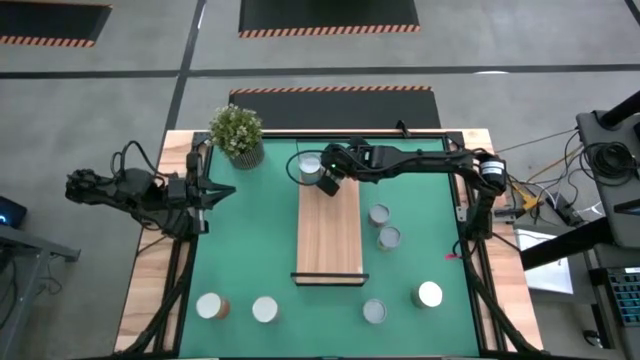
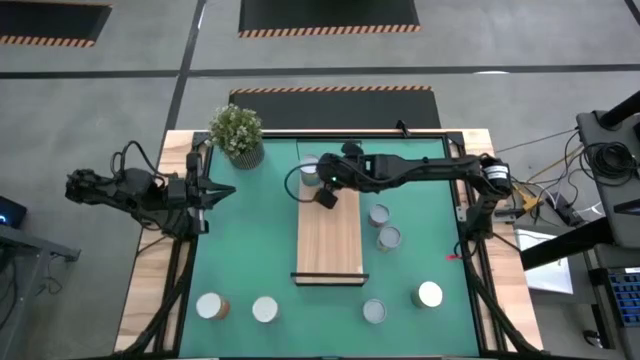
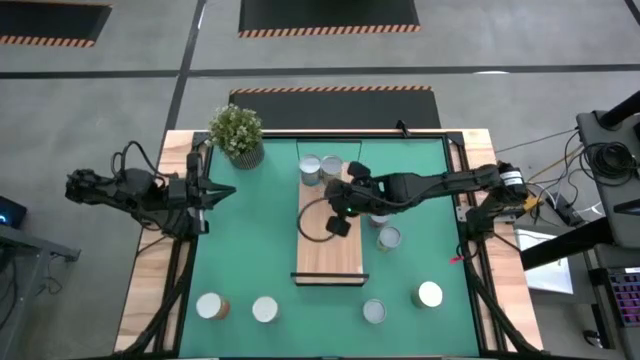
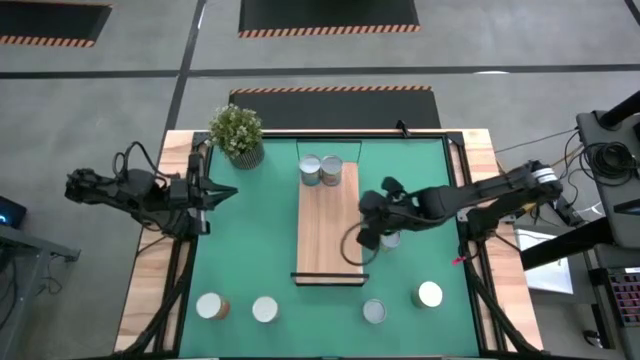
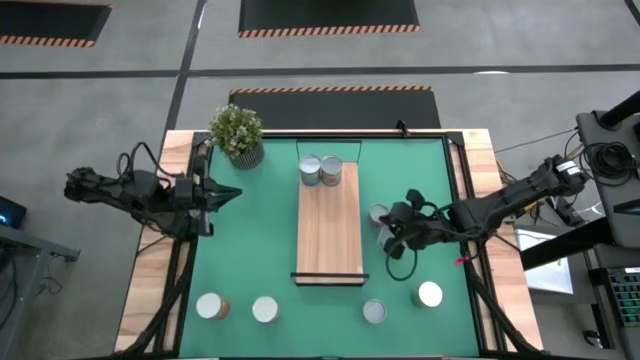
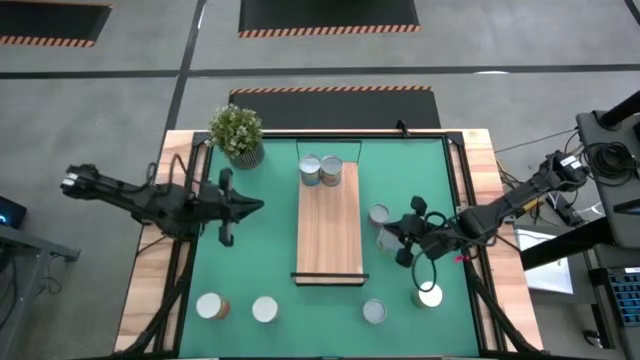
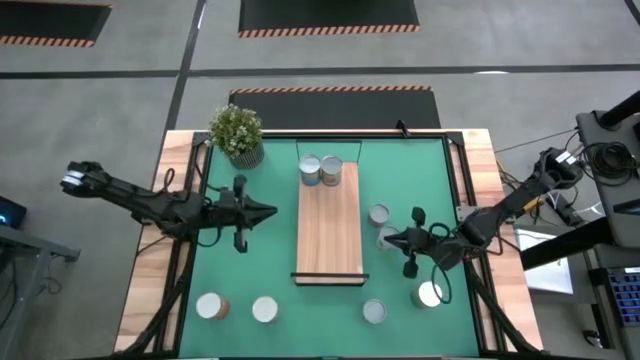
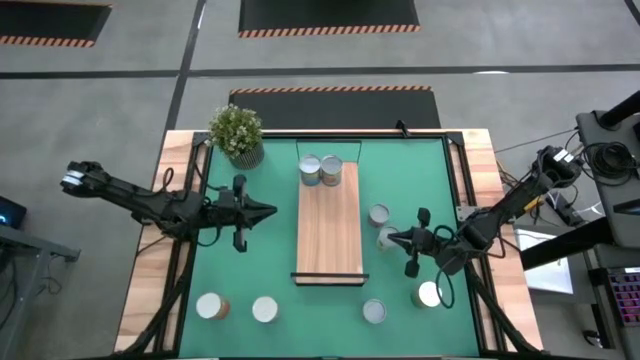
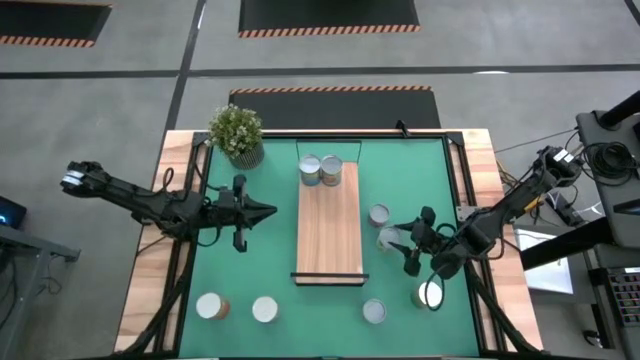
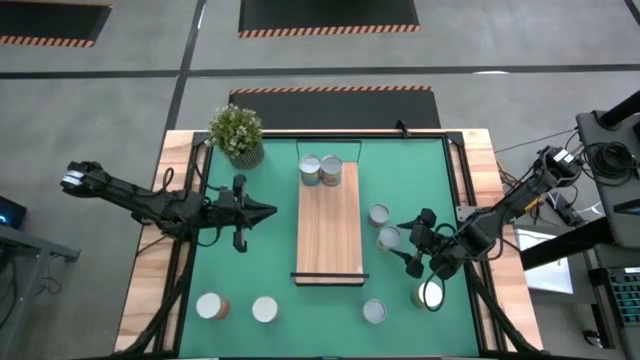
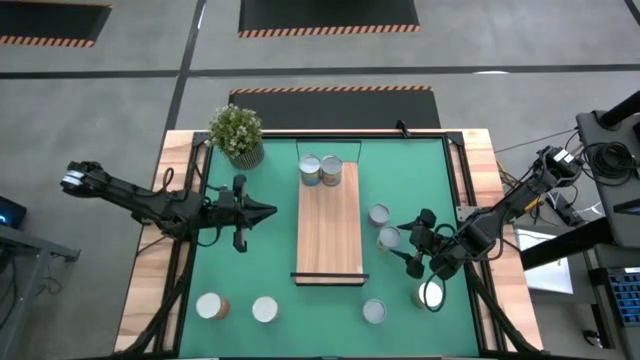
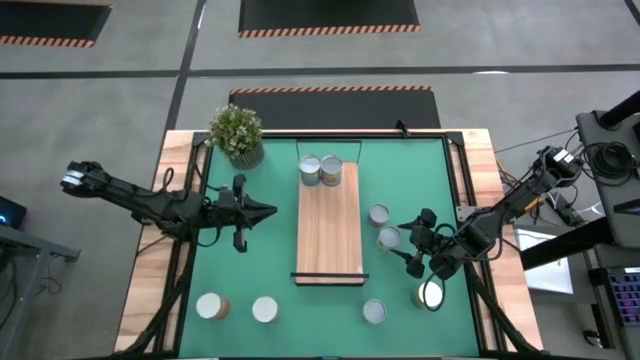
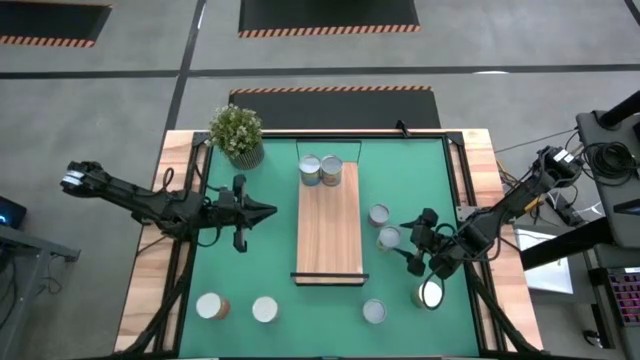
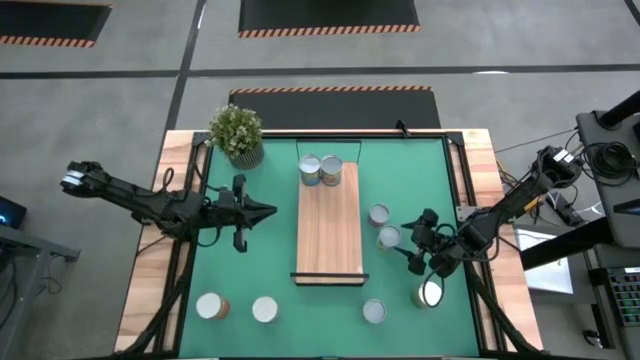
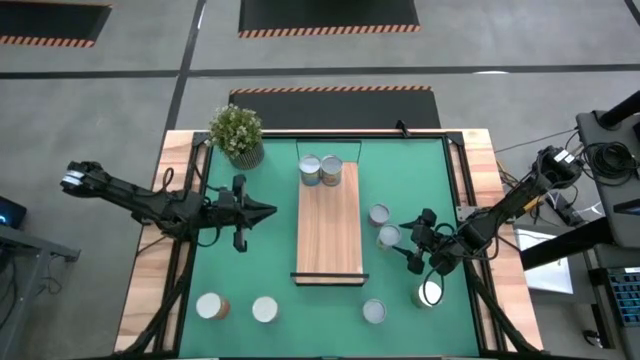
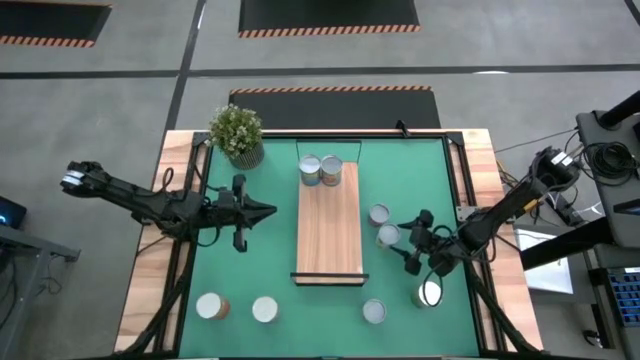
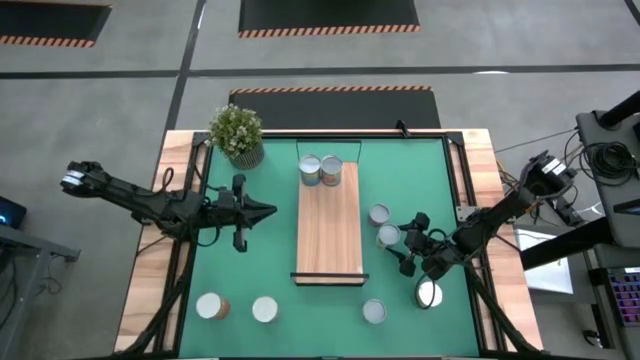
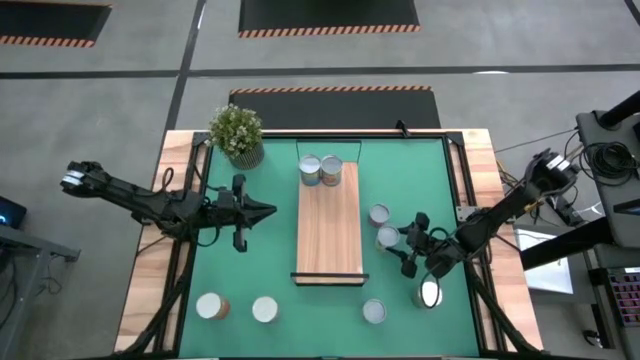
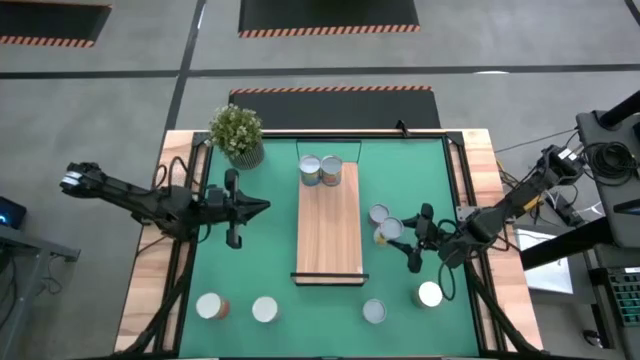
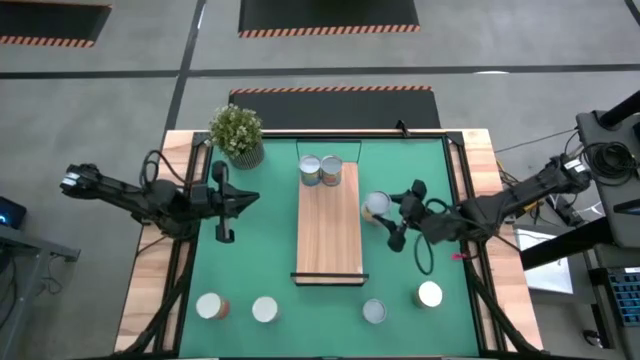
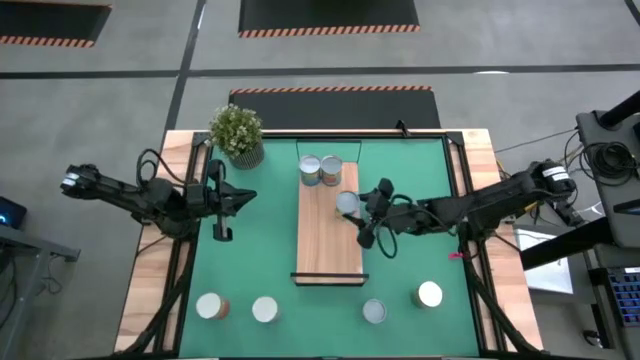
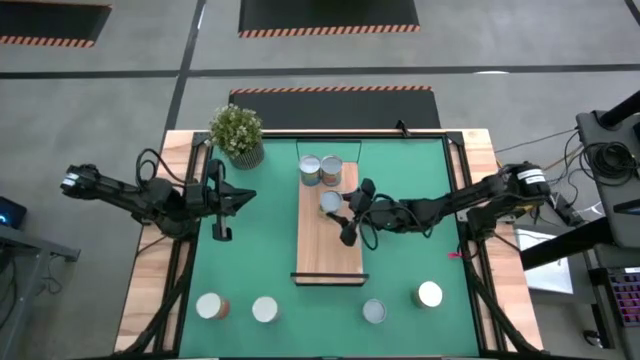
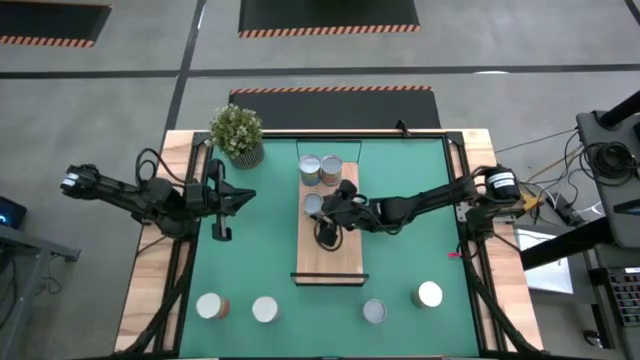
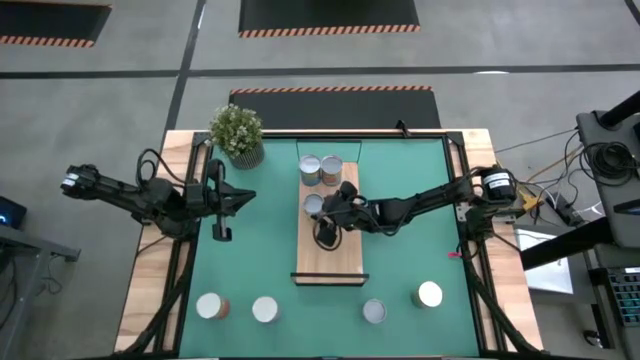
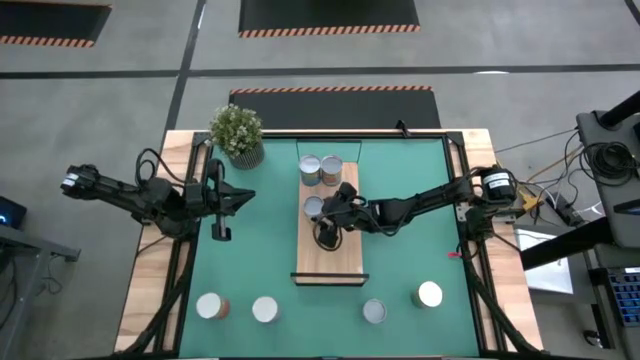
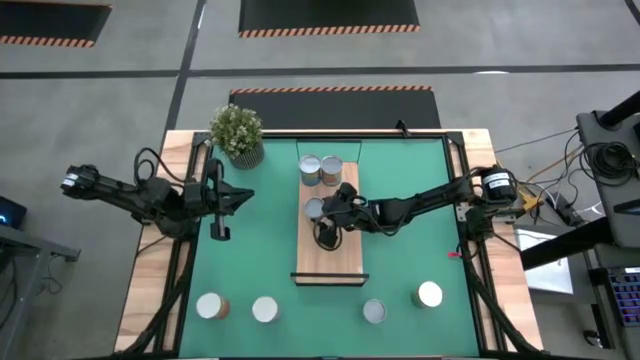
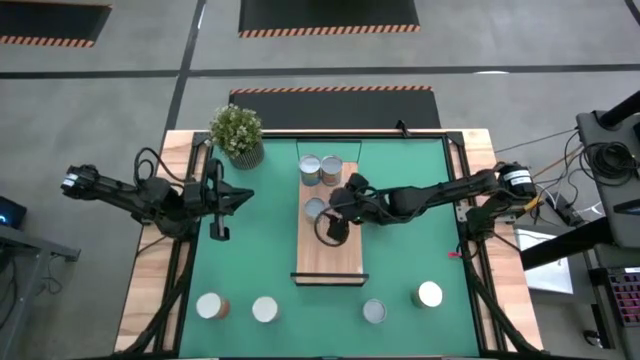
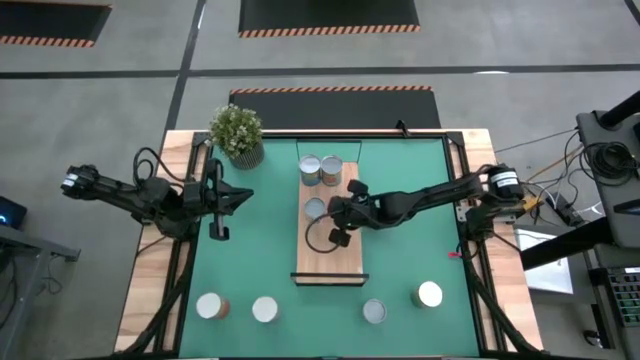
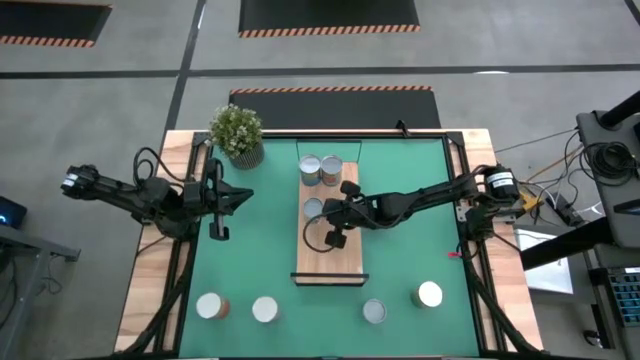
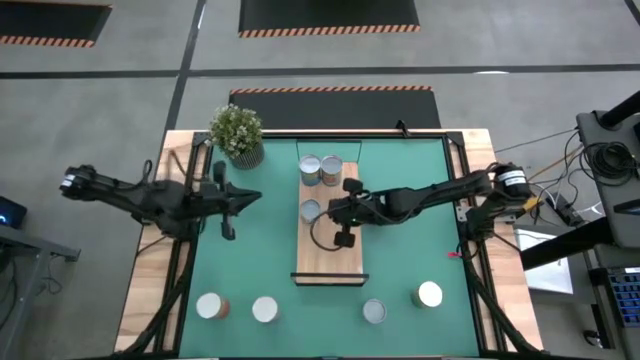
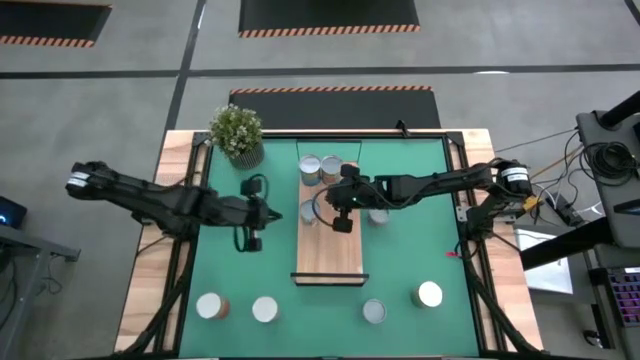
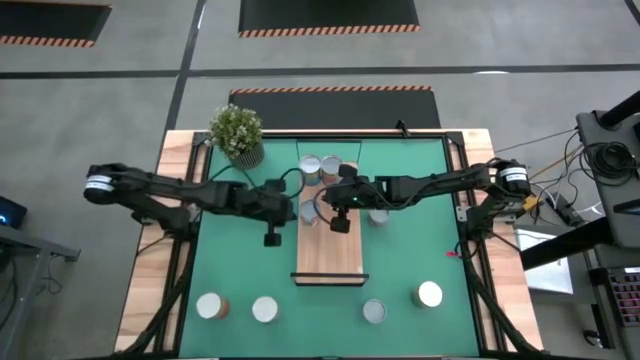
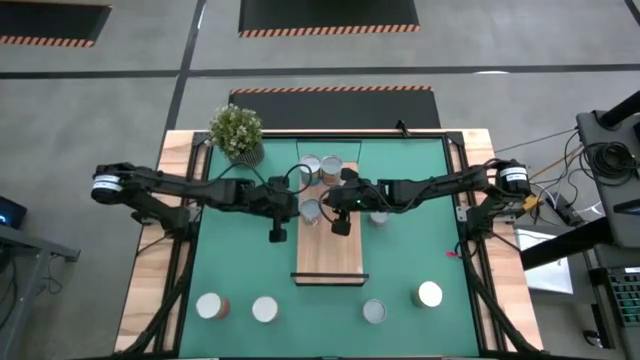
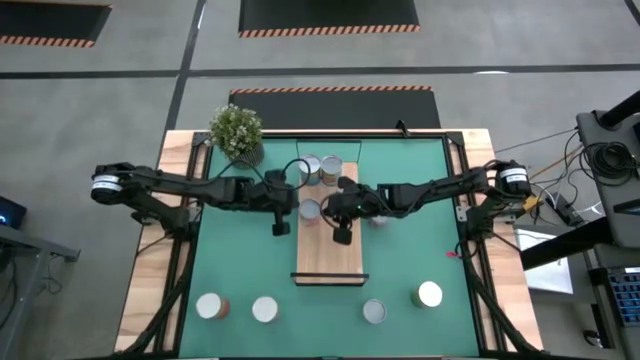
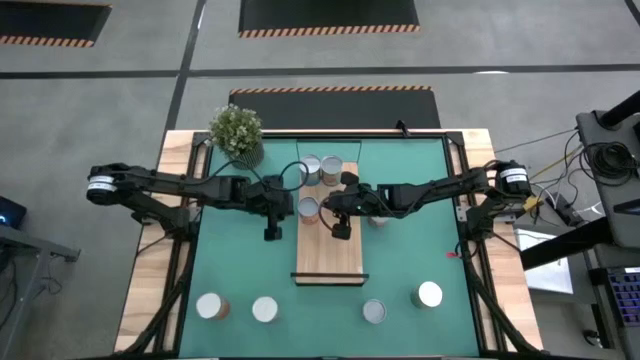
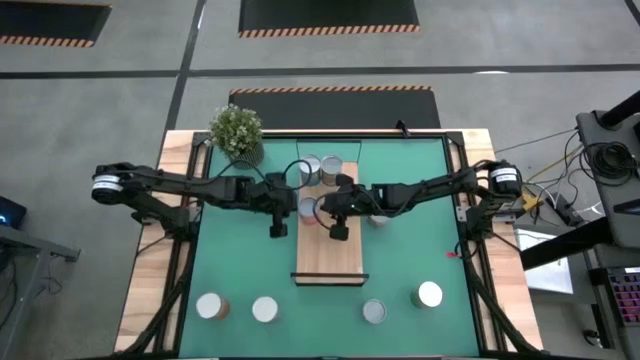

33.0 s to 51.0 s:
Task: Pick and place cans onto a shelf
Put the canned mixed fruits on the shelf

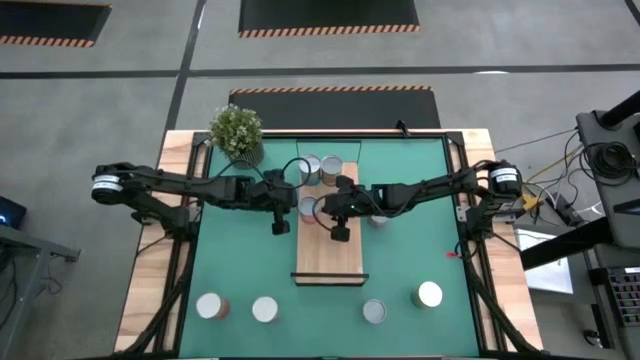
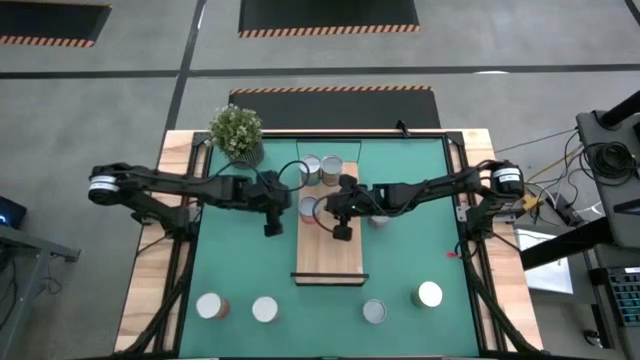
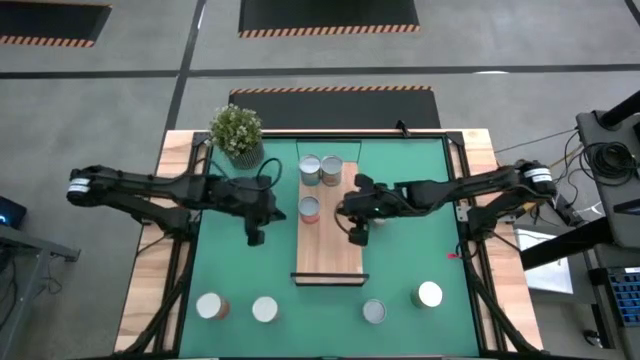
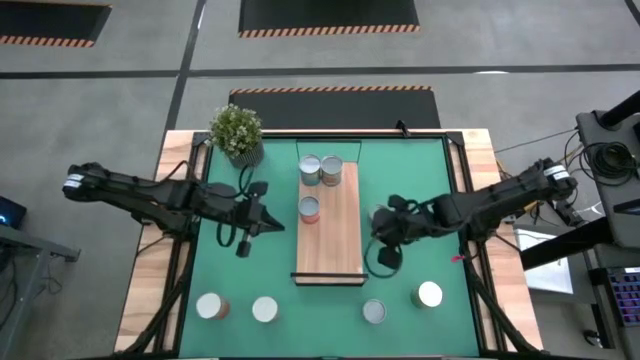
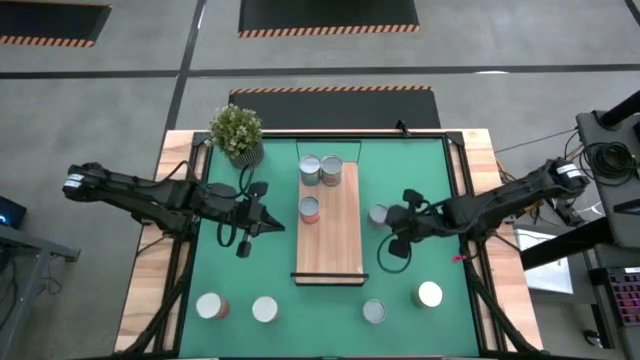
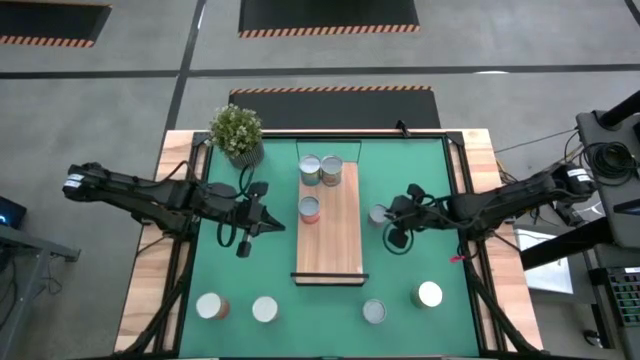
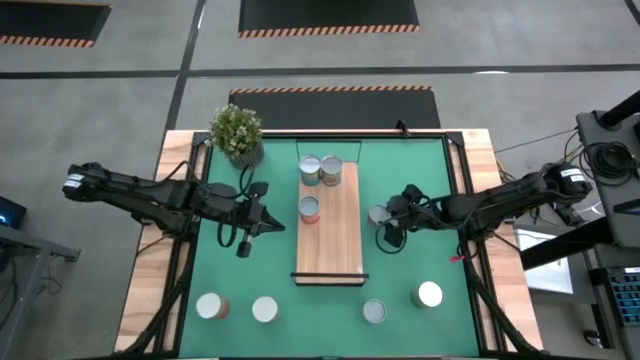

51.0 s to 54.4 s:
Put the small canned oranges on the shelf

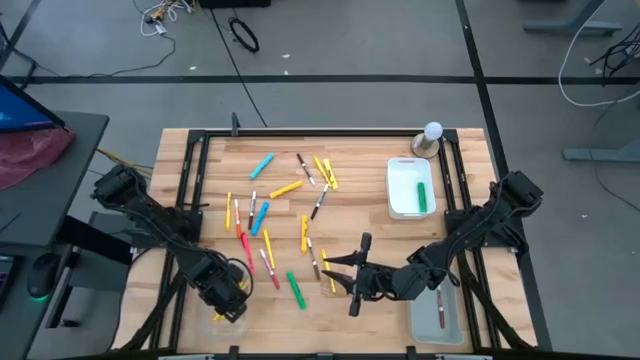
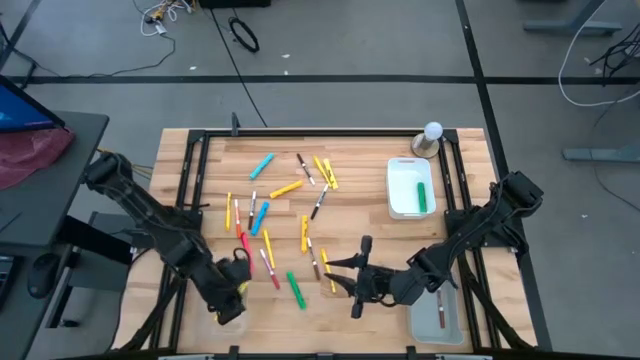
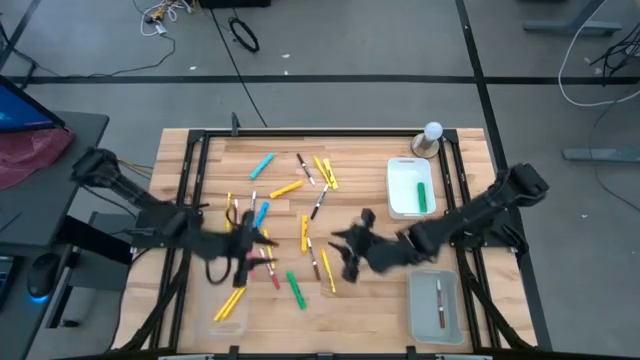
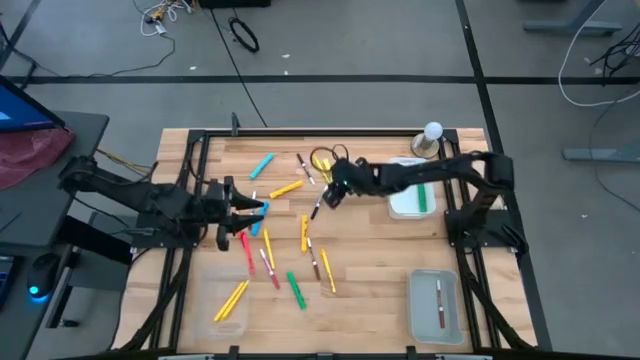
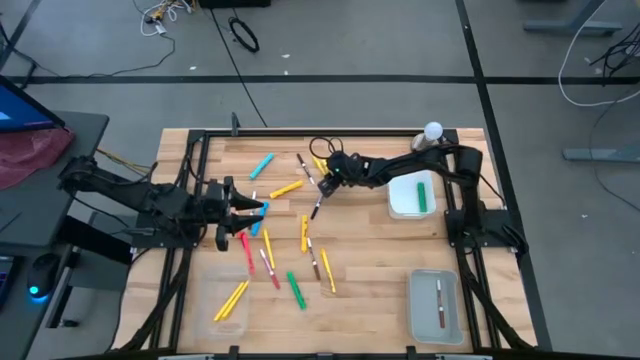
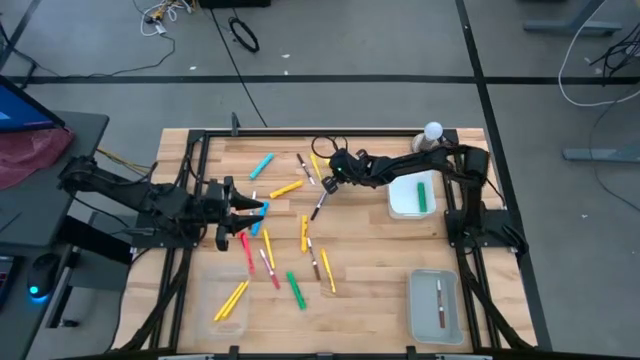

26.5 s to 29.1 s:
Task: Pick & Place Markers
Put the yellow highlighter into the white bin
